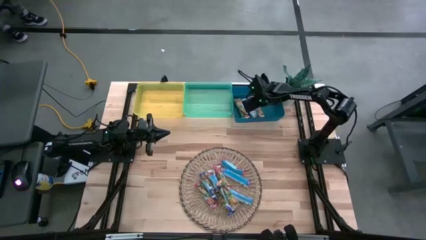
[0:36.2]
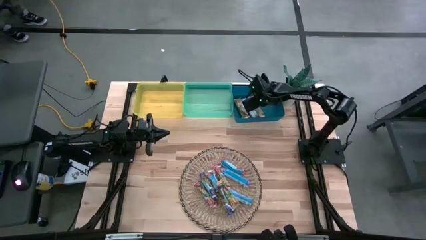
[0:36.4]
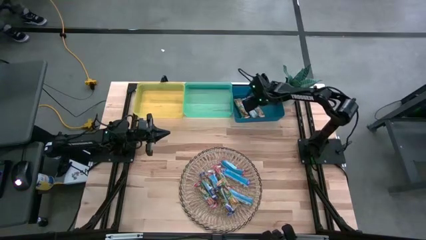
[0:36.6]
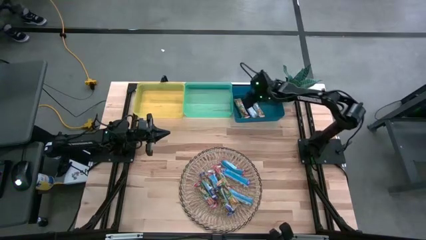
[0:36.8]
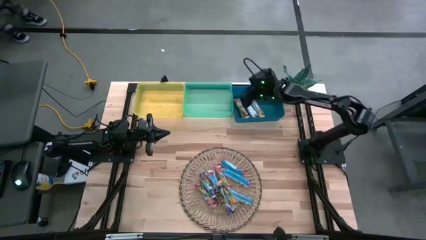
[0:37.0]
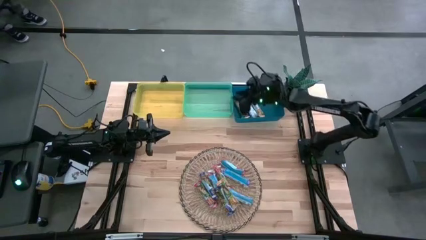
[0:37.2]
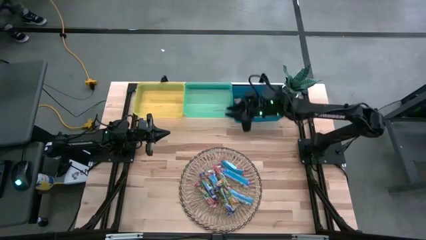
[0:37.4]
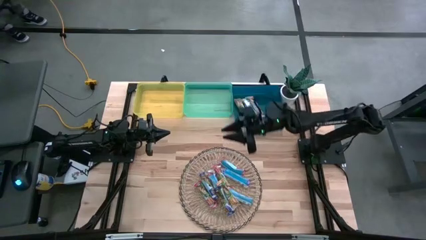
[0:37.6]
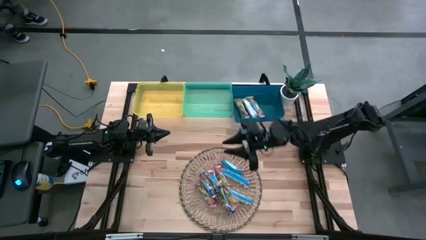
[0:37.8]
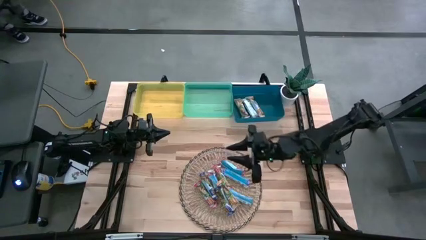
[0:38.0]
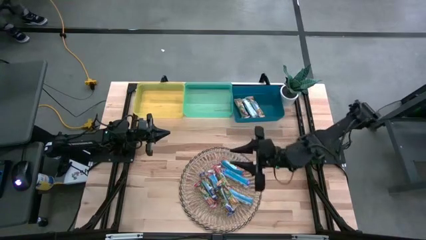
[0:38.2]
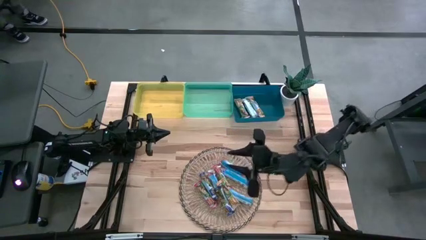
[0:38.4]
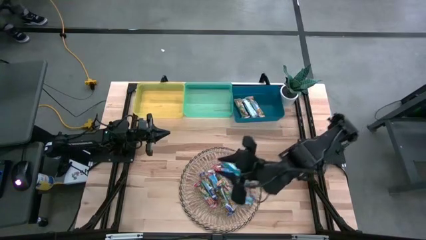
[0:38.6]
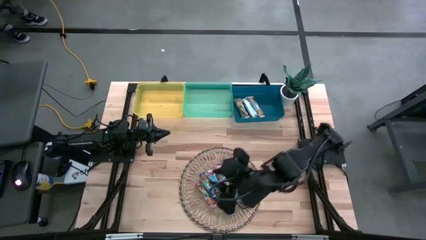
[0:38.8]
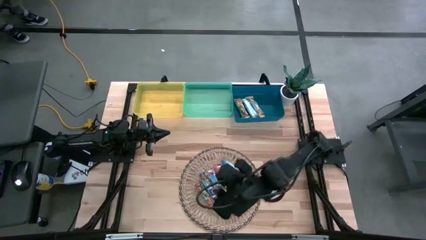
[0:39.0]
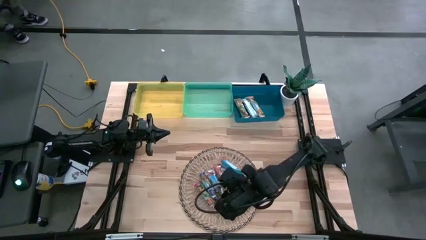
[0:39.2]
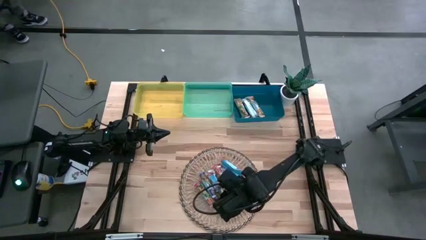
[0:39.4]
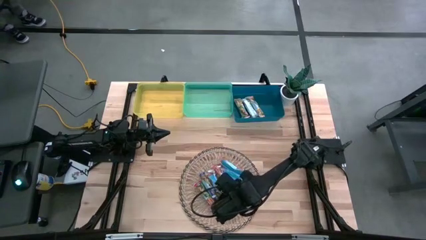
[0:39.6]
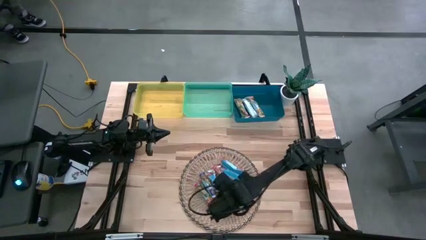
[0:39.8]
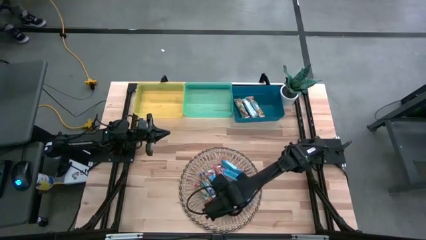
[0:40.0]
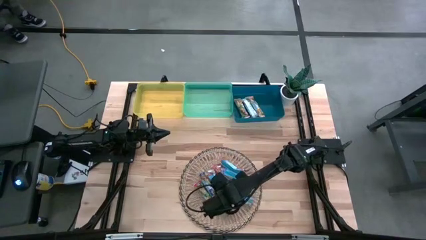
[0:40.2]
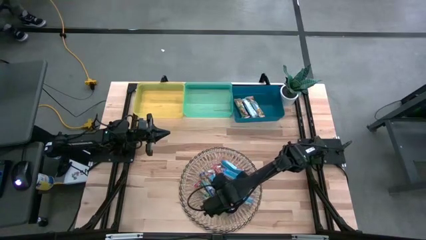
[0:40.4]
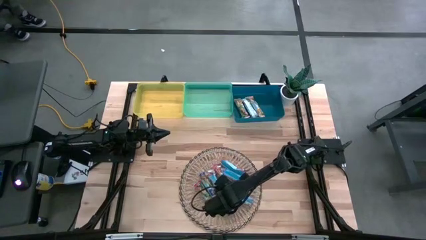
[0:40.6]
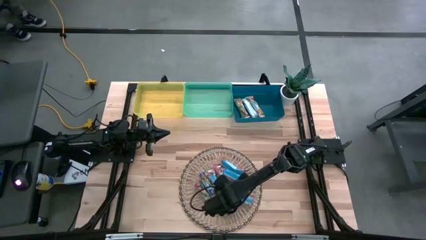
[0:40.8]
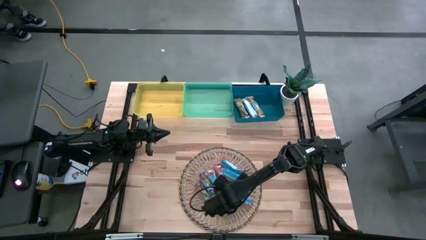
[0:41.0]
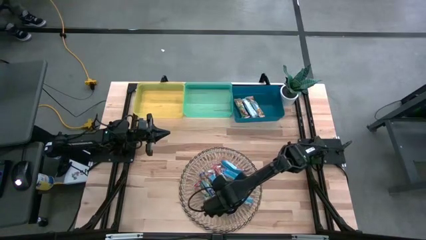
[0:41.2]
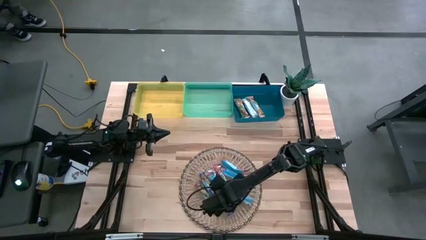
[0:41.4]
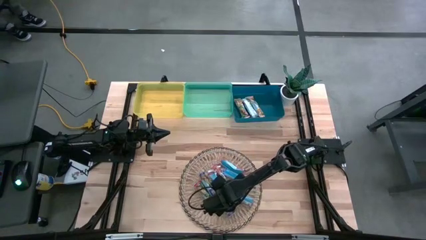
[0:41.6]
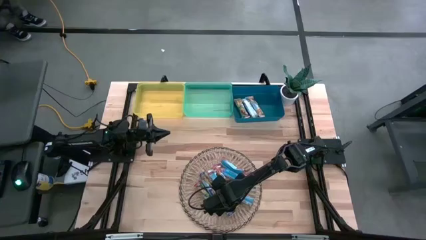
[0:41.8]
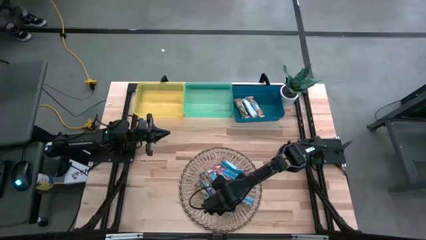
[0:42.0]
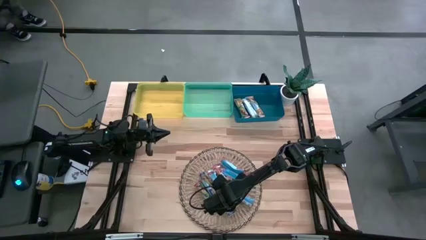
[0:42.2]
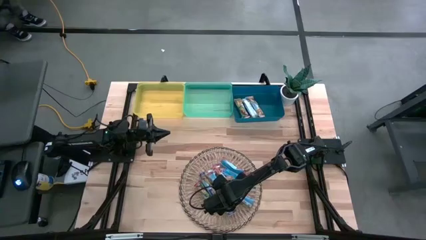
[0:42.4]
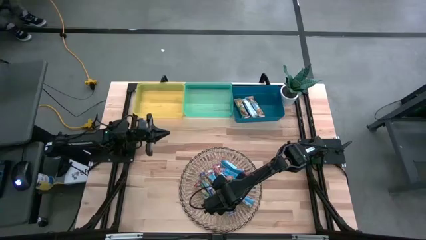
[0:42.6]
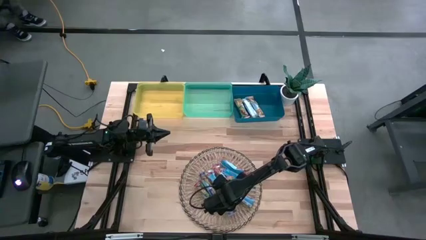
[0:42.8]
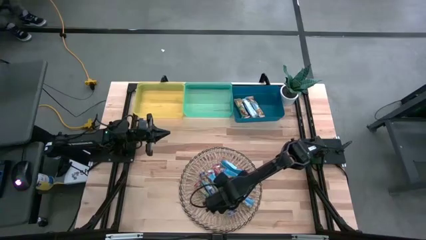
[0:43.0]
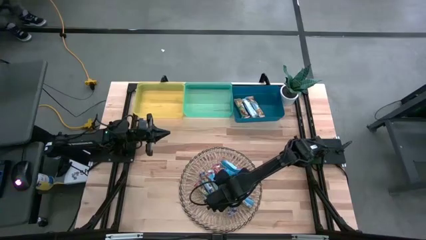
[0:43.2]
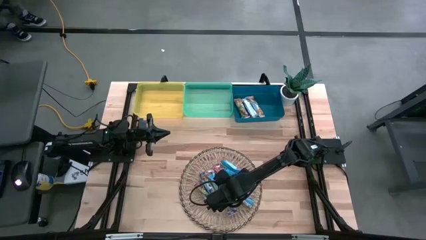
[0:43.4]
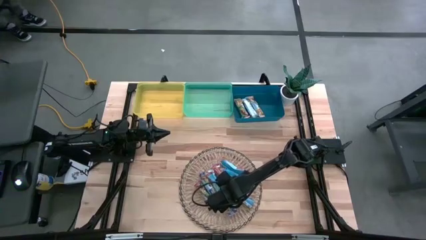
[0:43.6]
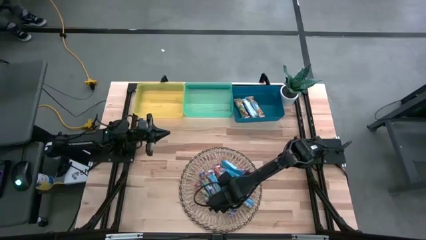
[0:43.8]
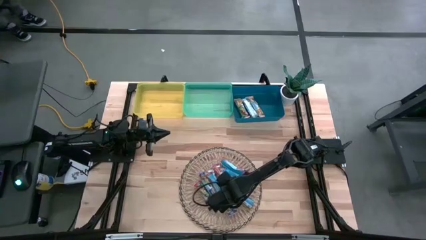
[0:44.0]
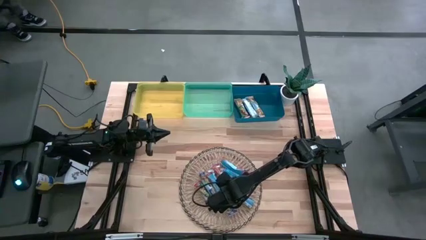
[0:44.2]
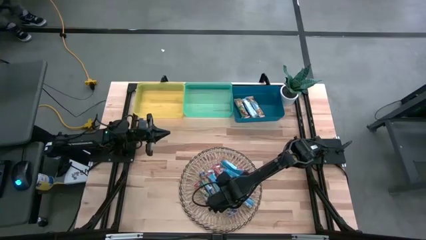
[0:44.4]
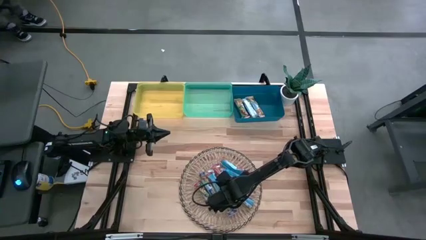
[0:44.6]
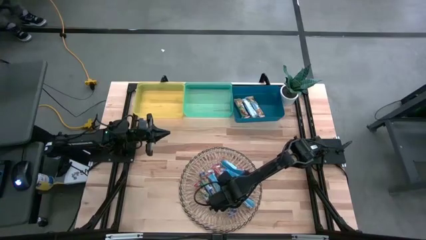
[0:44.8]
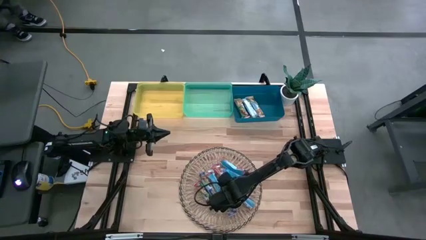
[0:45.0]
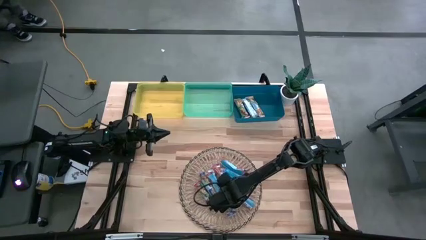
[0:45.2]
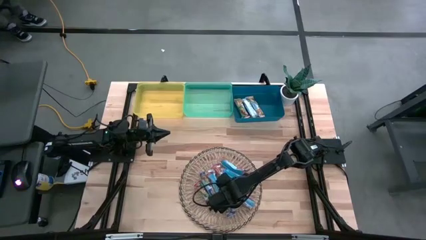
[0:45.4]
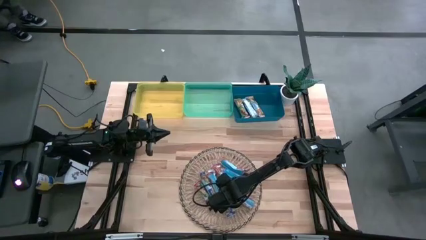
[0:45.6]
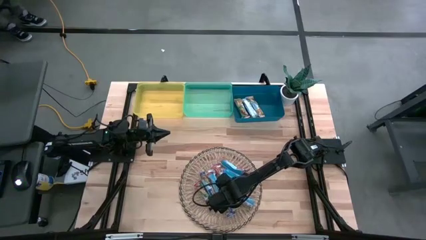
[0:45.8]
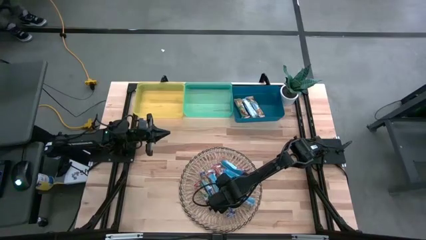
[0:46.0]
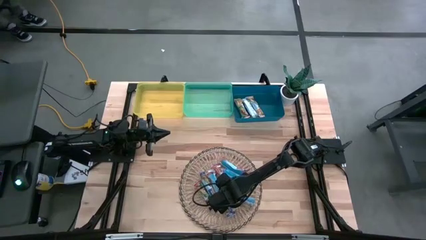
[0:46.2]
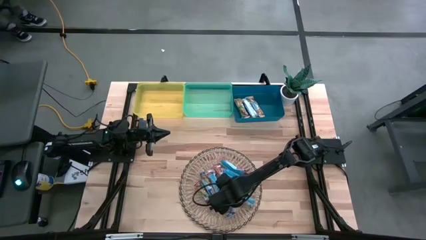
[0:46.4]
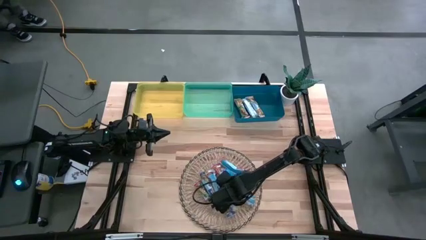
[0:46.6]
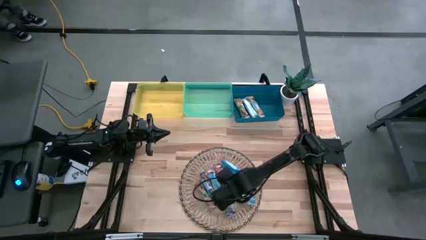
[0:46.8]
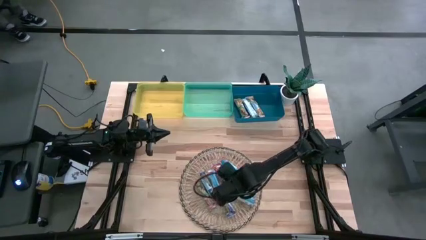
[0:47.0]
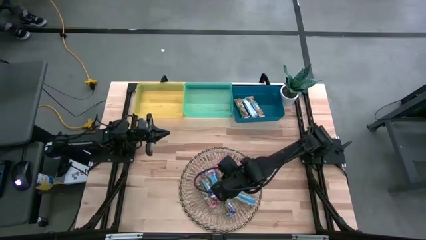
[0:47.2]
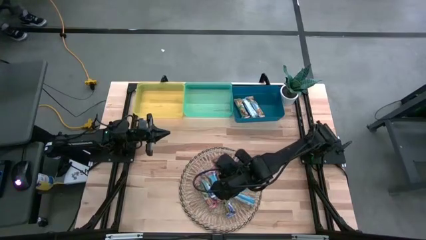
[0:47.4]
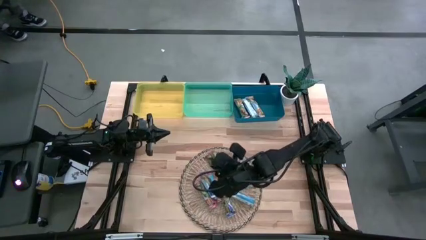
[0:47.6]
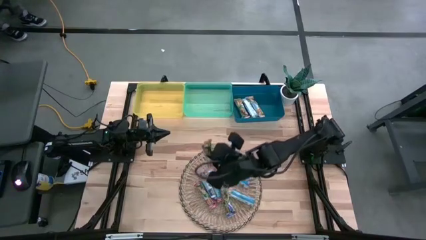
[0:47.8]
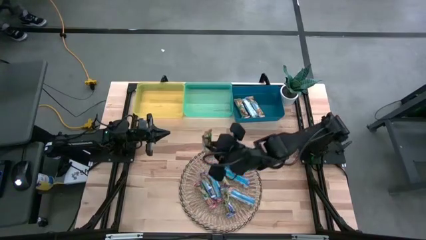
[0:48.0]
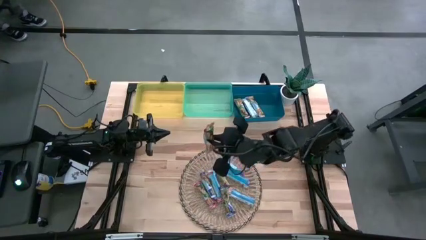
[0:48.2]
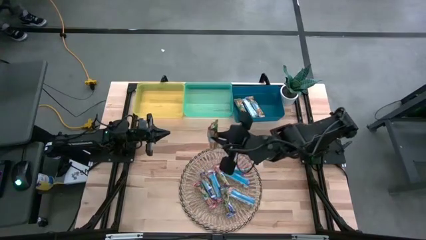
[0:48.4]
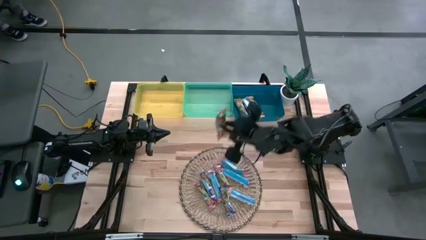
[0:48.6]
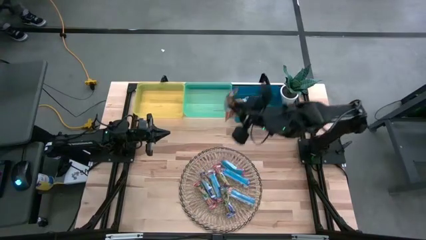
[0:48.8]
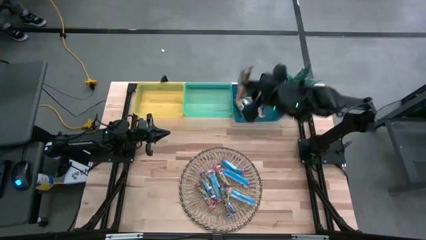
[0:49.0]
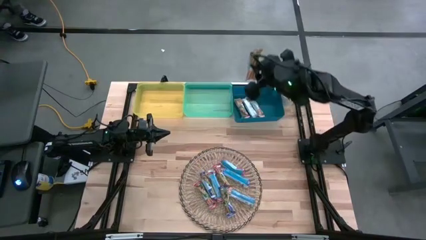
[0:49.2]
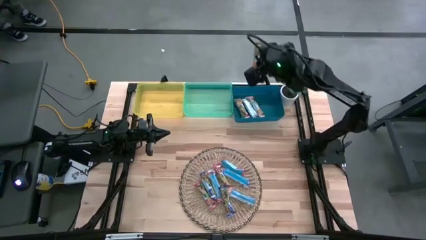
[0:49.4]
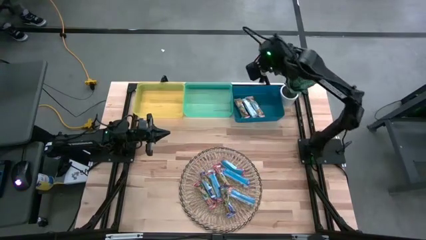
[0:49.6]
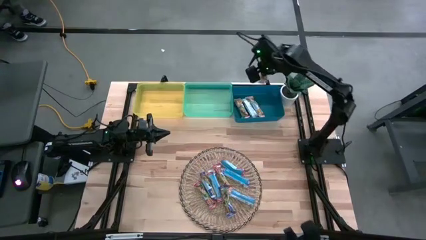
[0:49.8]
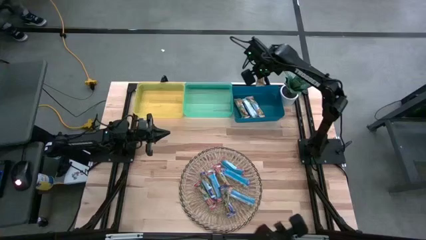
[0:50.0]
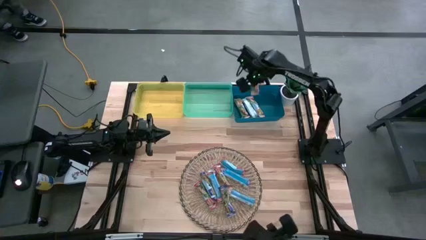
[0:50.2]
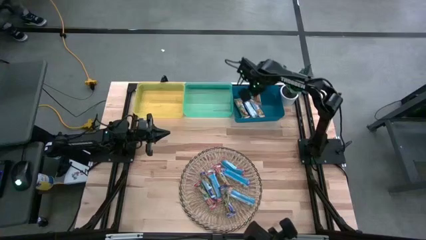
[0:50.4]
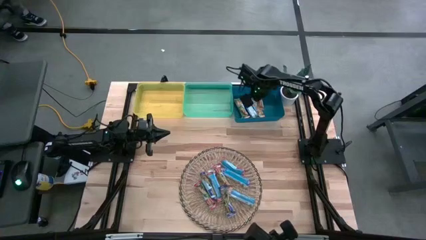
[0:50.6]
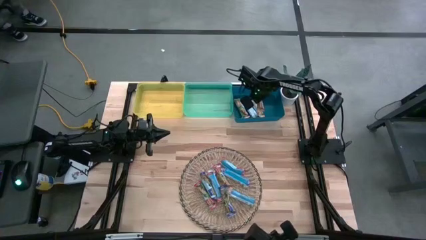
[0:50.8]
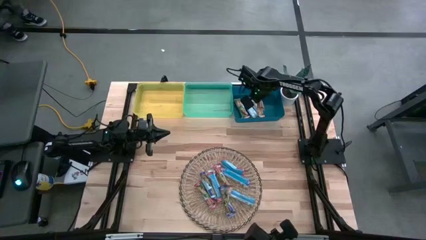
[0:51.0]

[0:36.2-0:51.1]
Task: Pick and place Granola Bars by type
Put the orange granola bar into the blue bin
